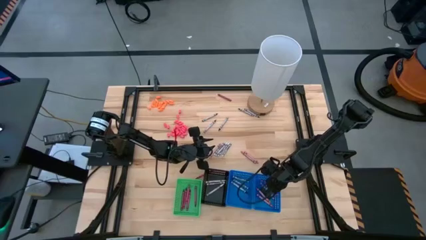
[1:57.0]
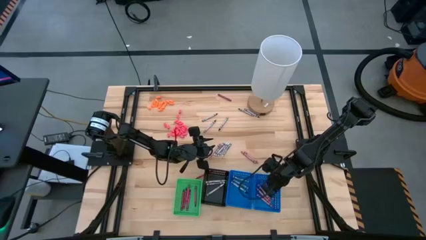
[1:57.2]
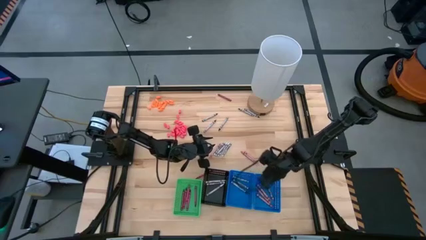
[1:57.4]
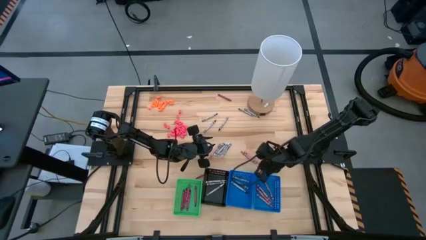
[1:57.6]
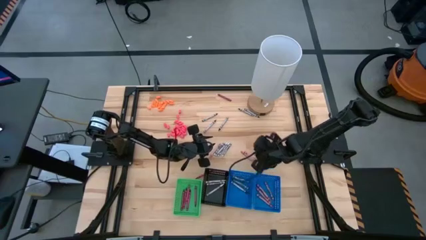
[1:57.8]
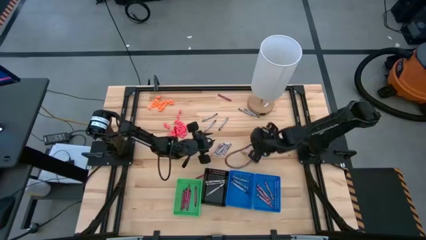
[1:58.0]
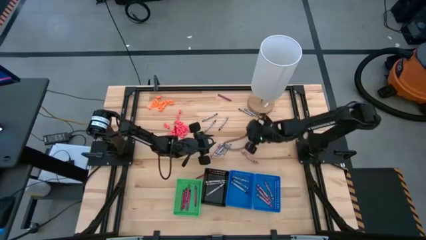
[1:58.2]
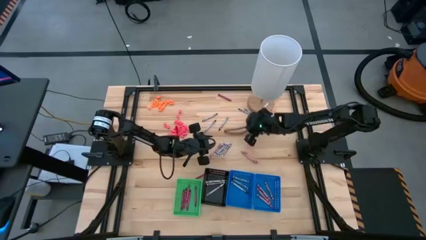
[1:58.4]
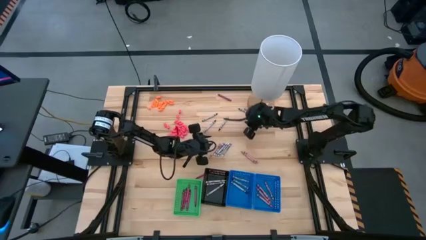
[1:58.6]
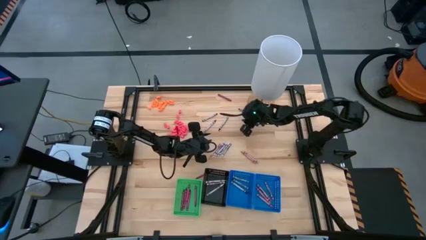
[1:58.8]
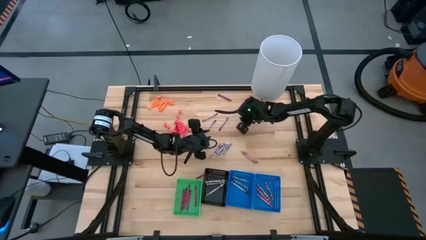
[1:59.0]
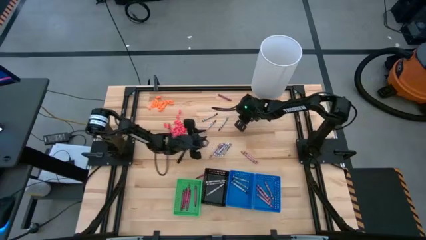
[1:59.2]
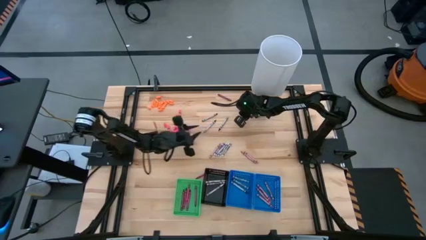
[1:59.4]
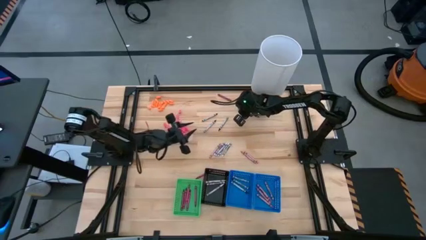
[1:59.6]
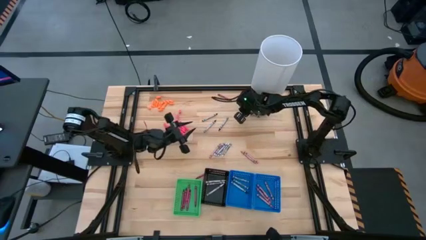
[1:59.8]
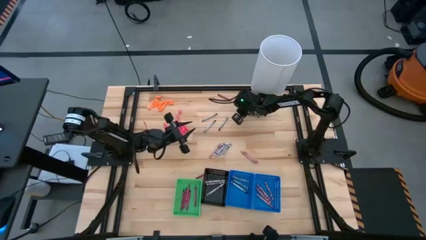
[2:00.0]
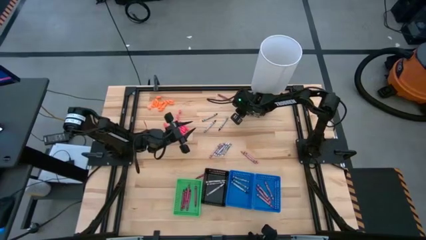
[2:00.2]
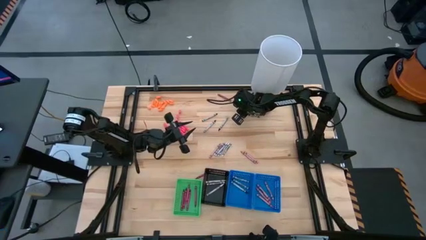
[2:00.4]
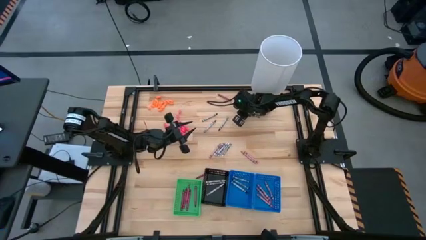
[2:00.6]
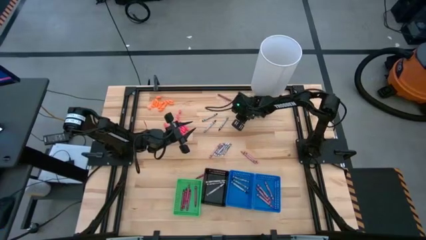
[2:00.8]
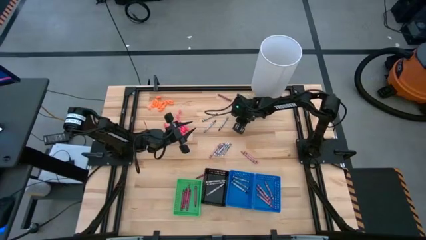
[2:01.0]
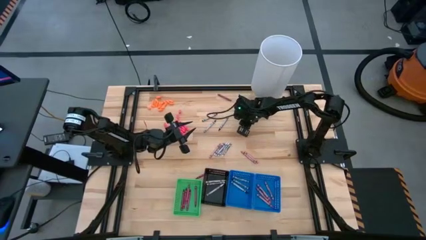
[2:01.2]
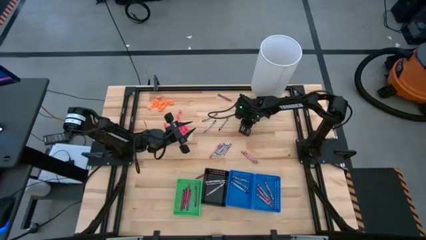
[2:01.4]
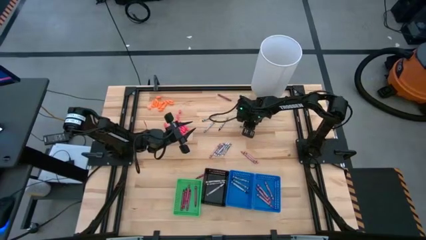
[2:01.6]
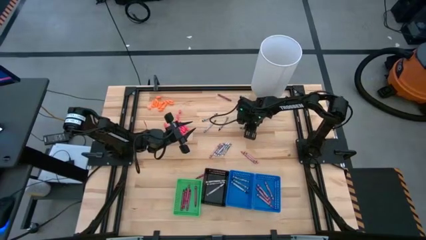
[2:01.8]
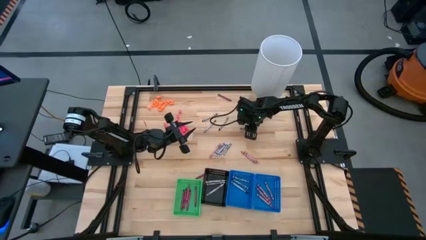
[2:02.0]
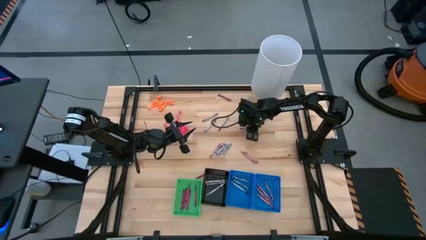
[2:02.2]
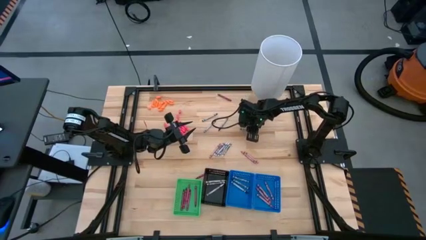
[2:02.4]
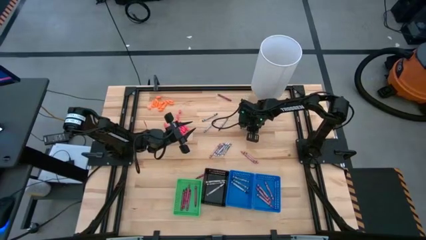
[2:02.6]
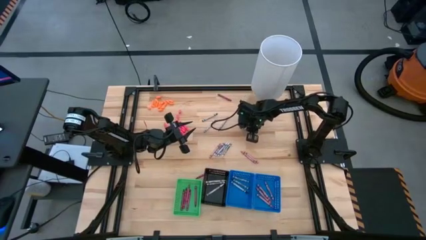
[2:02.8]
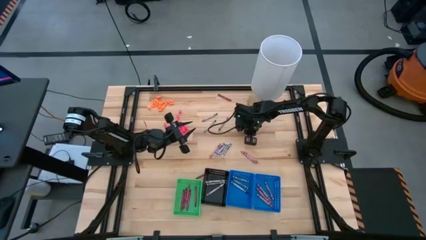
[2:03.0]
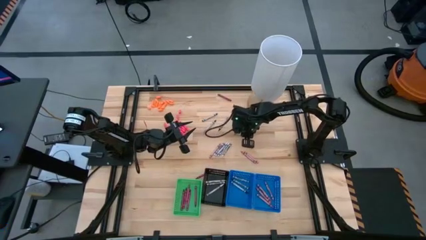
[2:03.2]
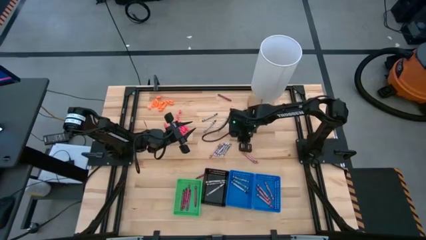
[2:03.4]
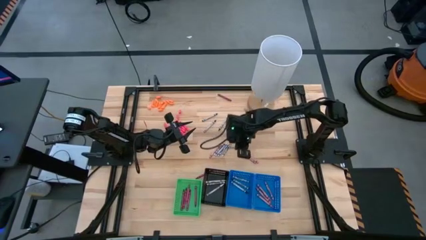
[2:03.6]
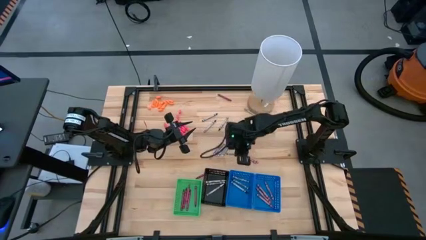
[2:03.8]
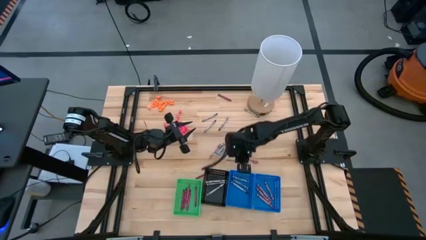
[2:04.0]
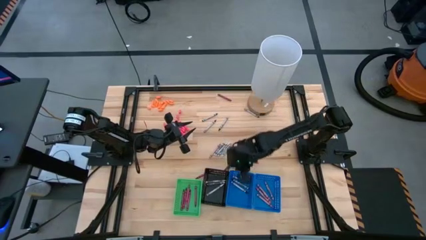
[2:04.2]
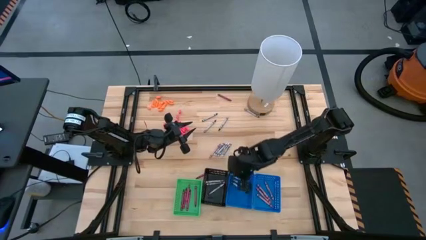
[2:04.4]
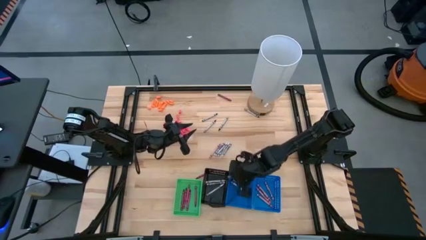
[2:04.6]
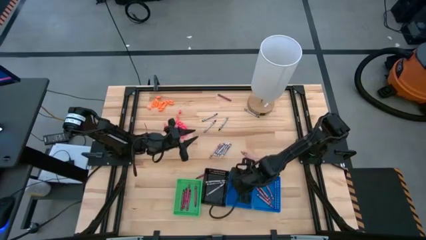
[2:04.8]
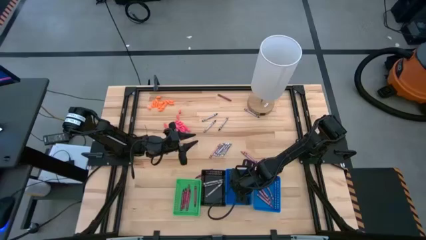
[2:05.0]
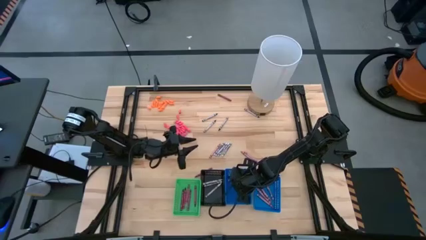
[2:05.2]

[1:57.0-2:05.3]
Task: Sort crayons
Put the black crayon into the left blue bin

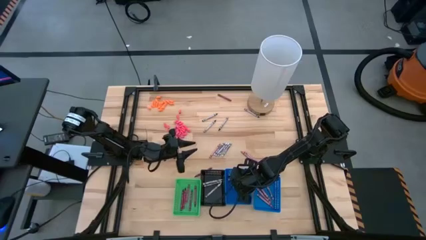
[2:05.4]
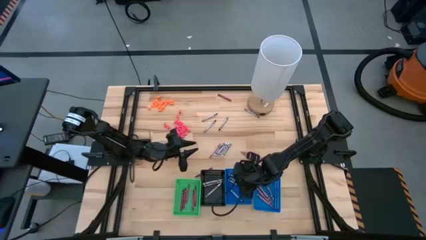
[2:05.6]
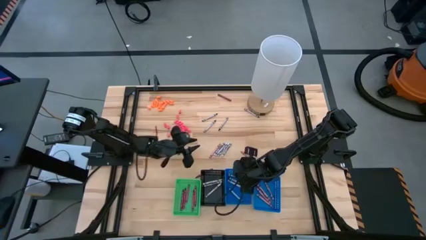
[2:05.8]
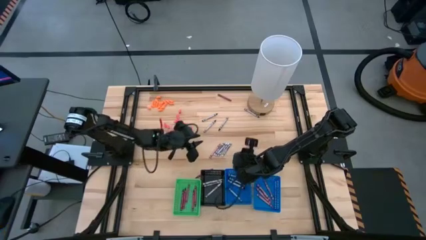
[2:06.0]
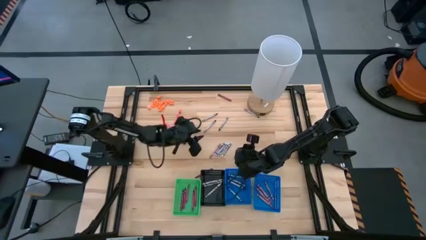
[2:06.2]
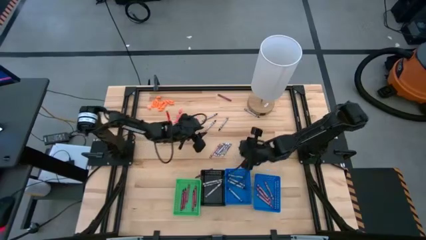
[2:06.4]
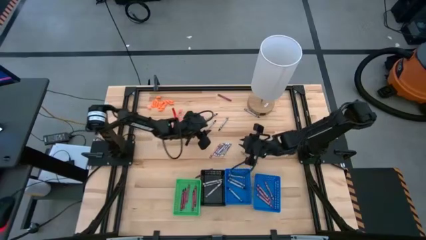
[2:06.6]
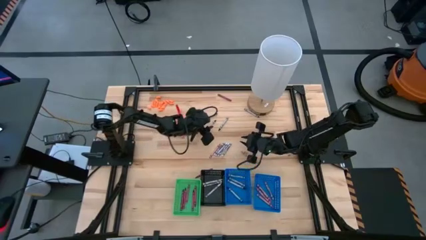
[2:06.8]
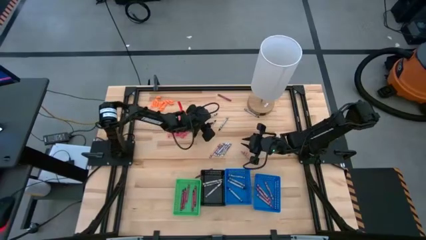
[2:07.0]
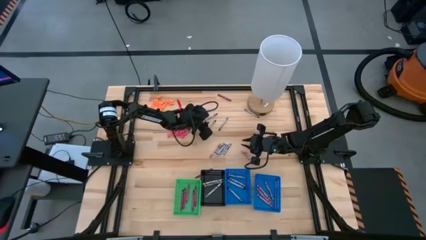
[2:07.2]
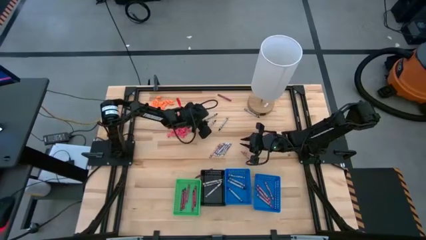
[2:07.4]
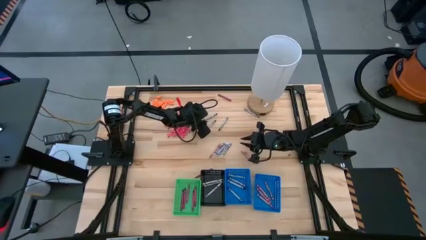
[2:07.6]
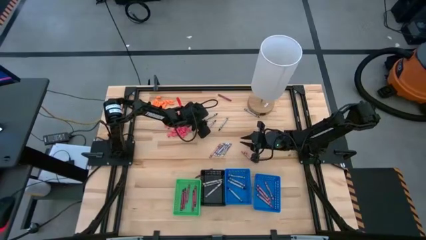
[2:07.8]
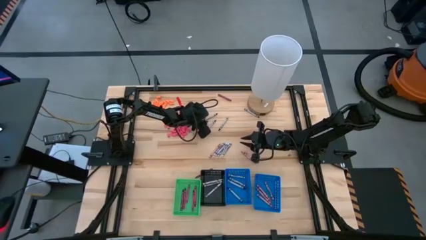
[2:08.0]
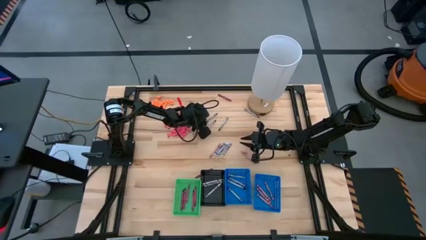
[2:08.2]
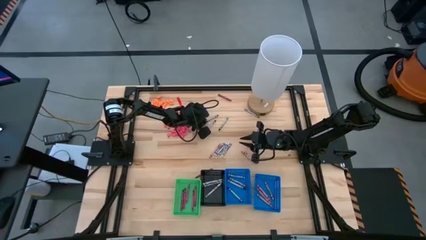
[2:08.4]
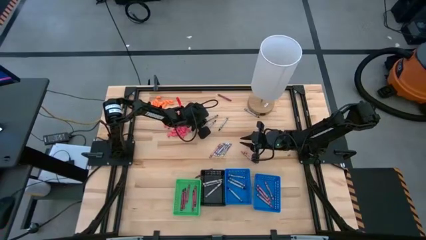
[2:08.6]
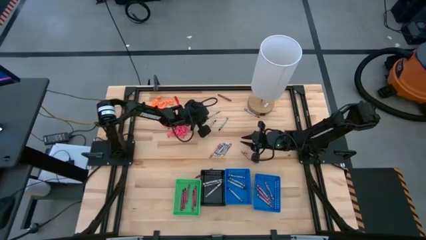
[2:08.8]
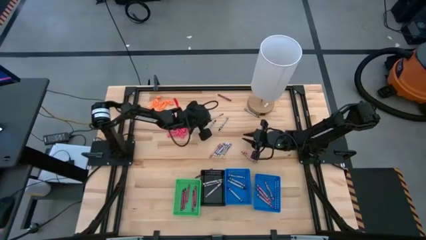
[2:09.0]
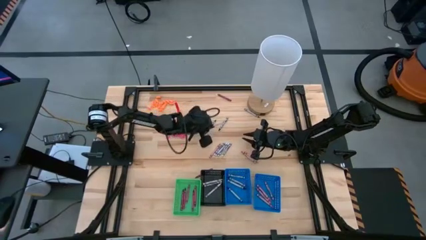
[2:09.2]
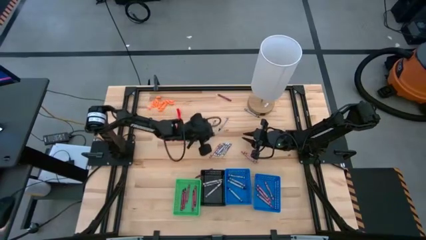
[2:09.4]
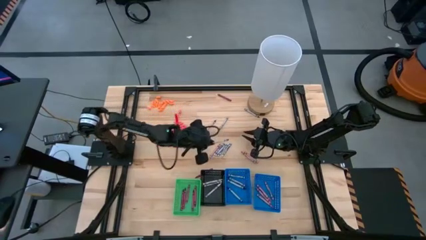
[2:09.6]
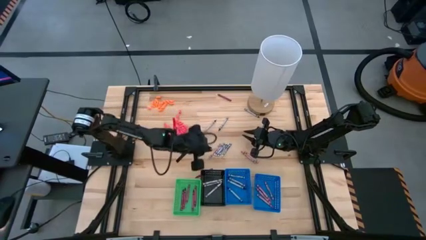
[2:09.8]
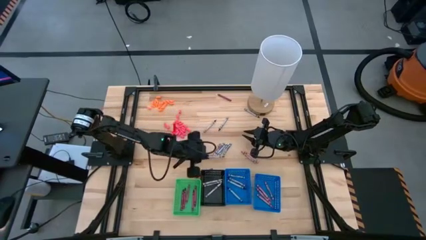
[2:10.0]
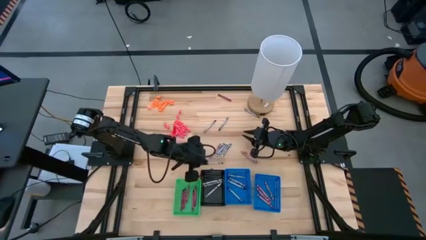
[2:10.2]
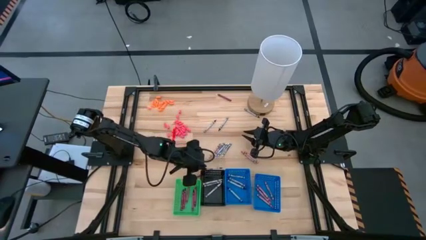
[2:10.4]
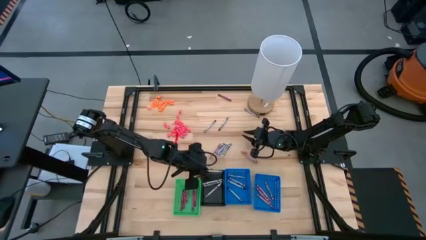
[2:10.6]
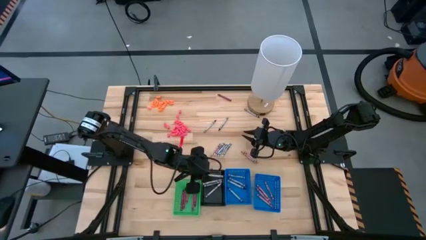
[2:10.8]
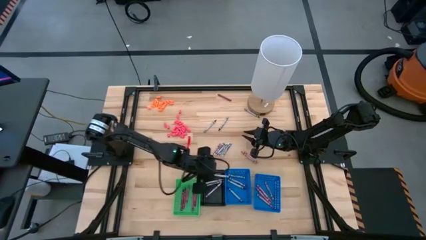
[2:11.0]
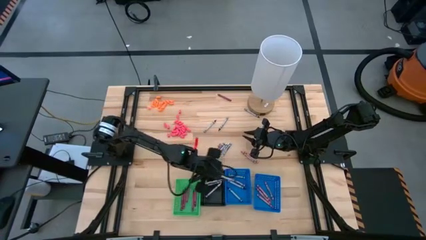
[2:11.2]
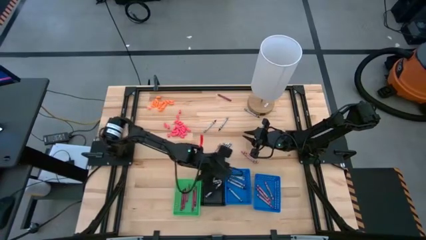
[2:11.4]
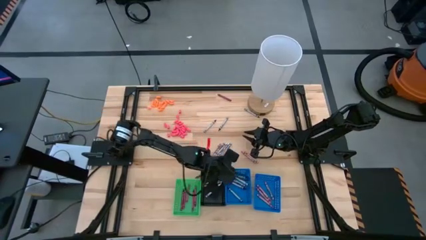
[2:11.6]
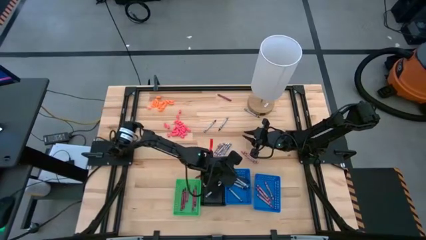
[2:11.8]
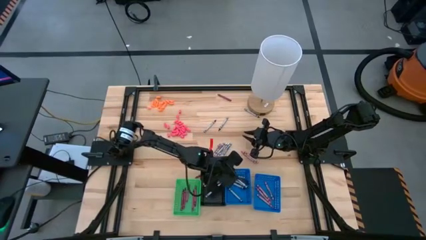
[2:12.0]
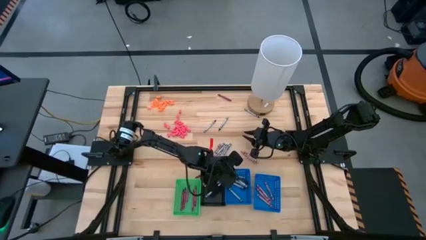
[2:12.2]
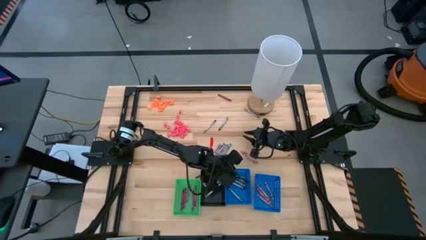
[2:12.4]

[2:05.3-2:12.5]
Put the black crayon into the left blue bin
